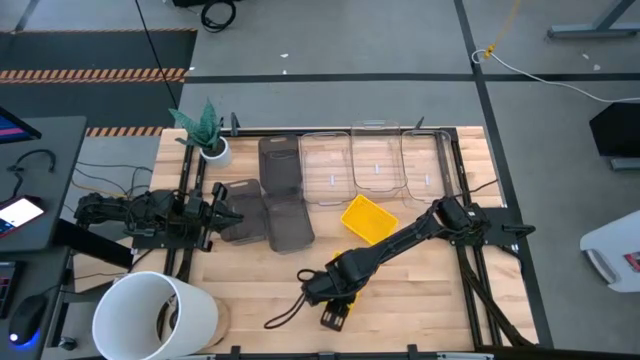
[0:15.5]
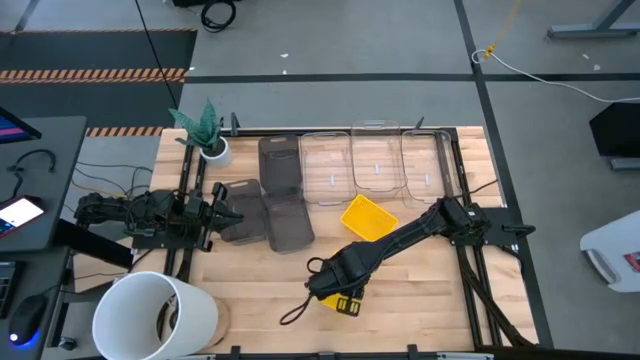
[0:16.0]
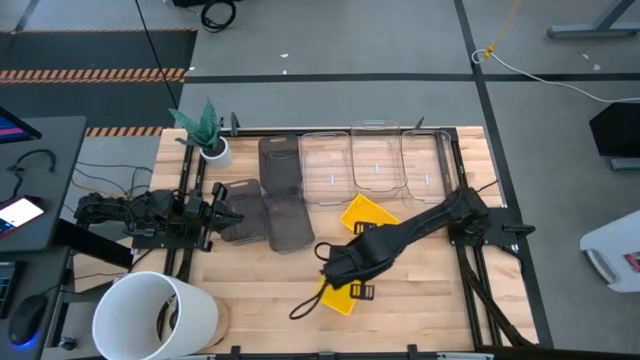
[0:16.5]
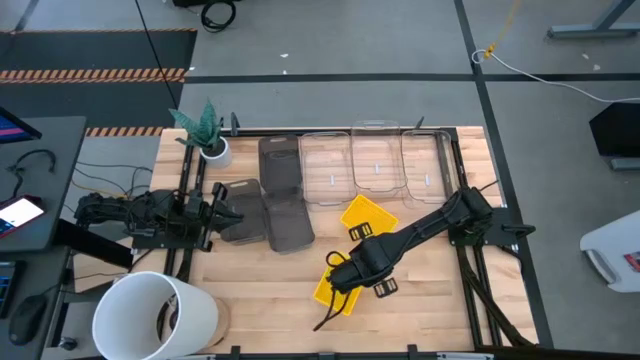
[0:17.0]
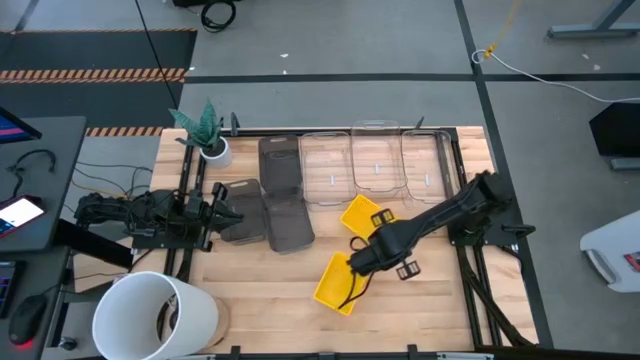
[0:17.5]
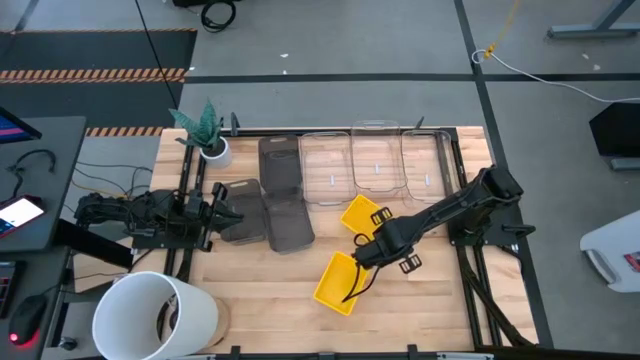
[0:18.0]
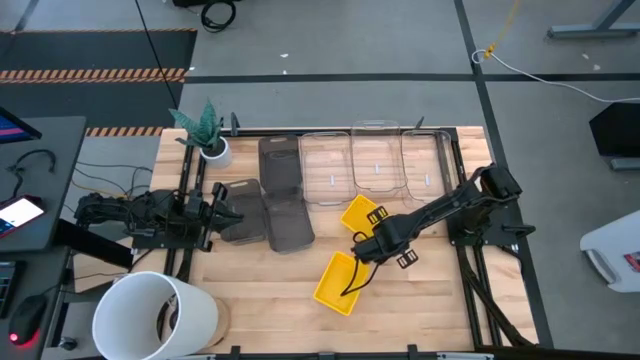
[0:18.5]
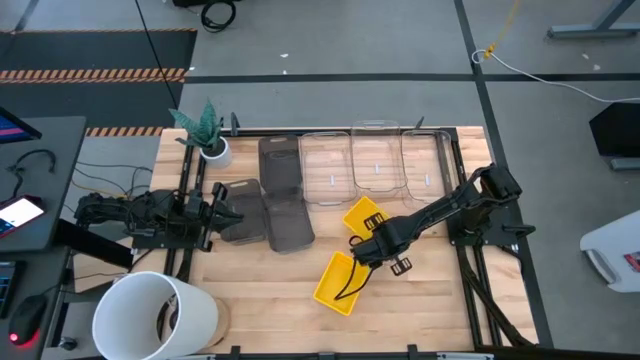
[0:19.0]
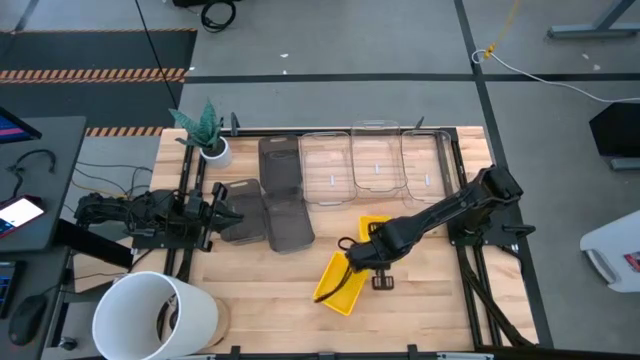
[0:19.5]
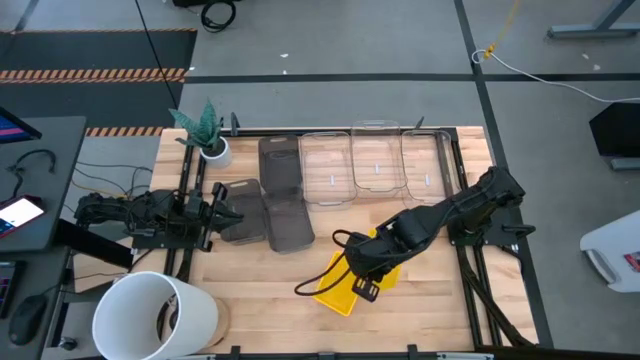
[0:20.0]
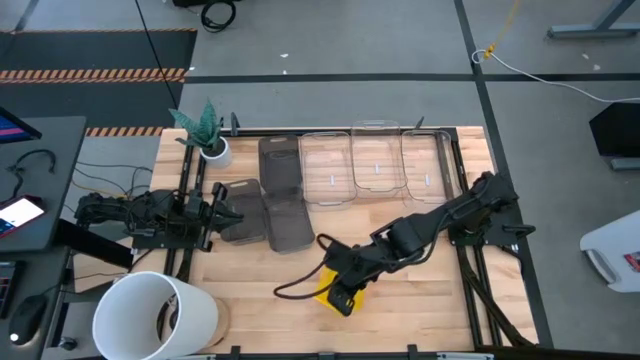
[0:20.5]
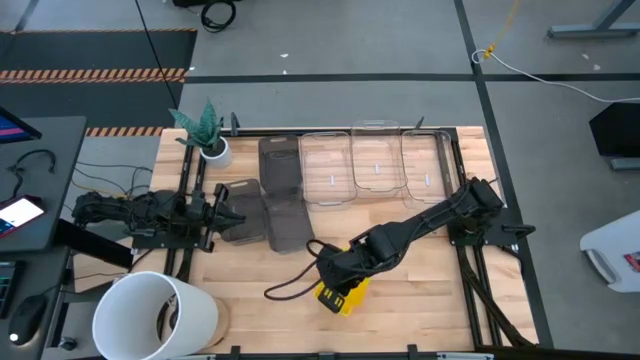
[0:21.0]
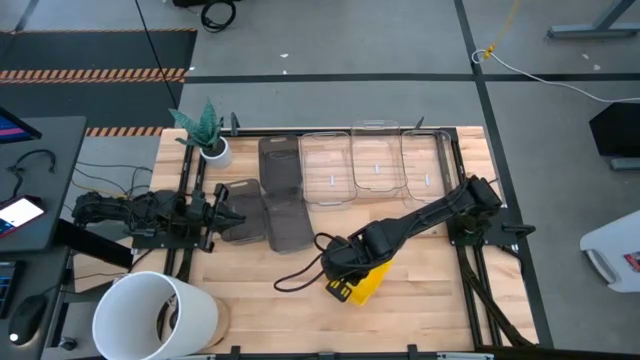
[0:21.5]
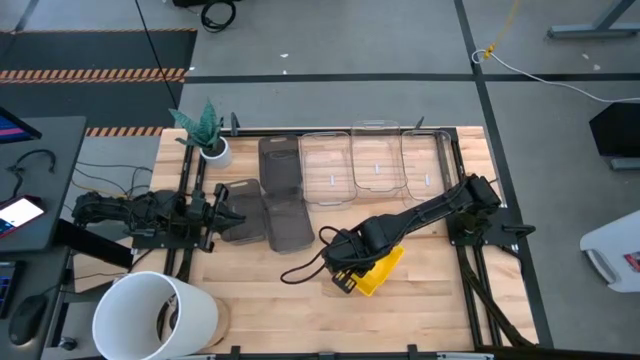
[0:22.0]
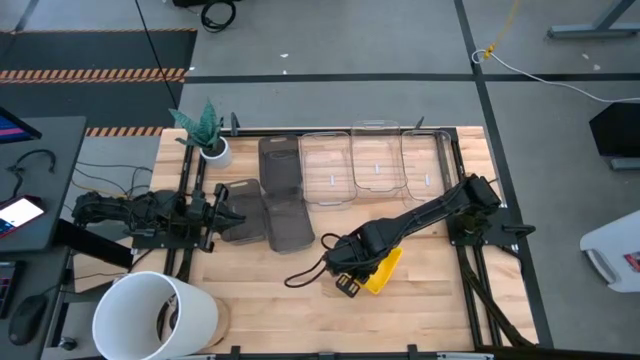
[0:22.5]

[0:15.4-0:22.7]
Stack the yellow bin on the stacked yellow bin

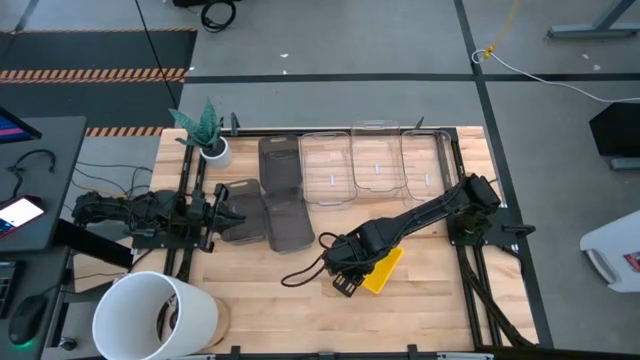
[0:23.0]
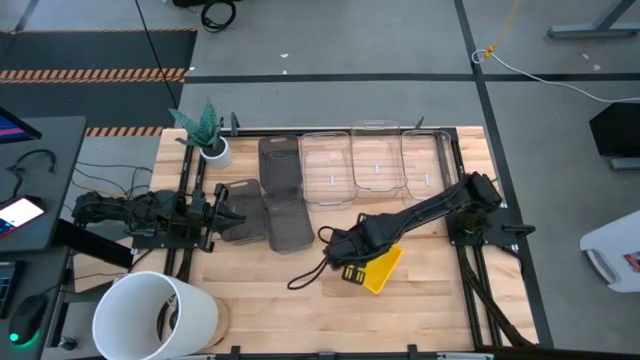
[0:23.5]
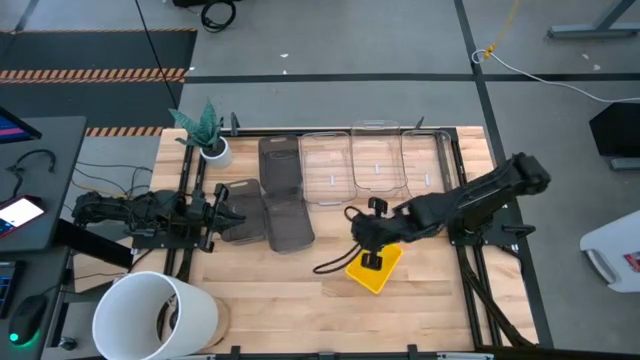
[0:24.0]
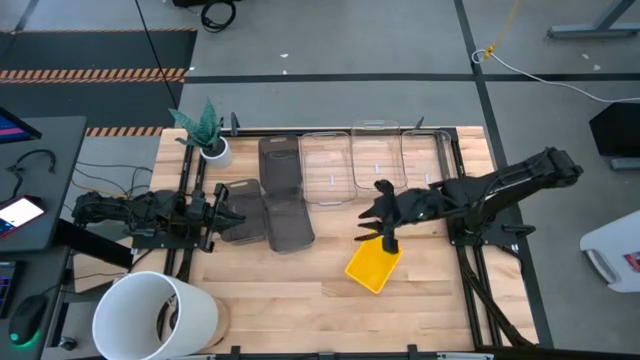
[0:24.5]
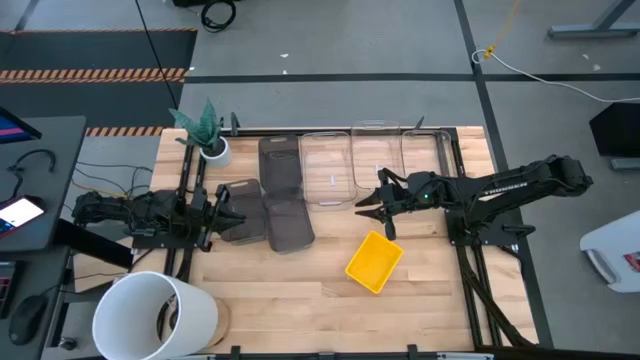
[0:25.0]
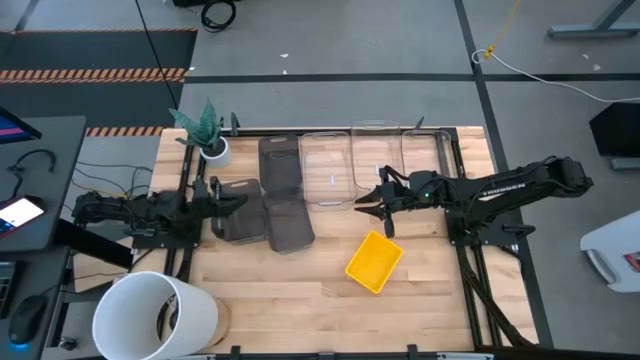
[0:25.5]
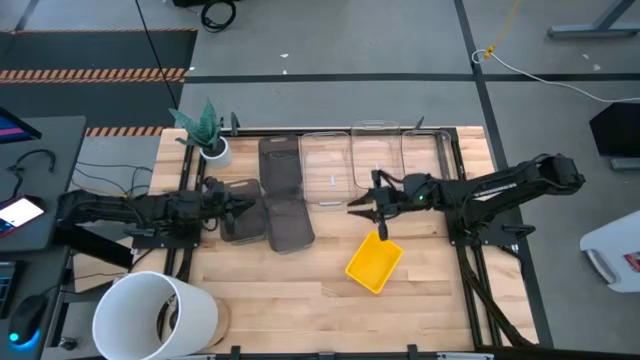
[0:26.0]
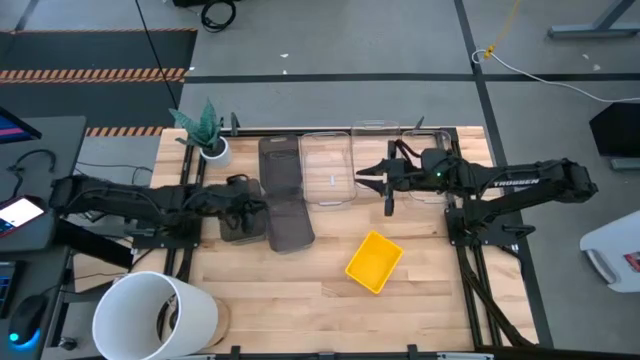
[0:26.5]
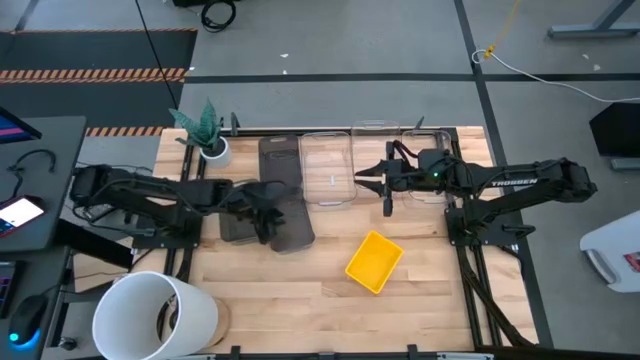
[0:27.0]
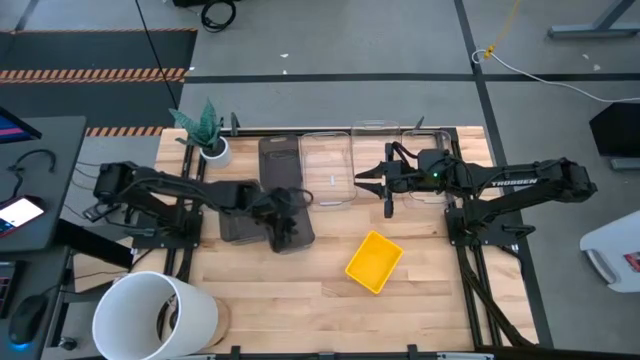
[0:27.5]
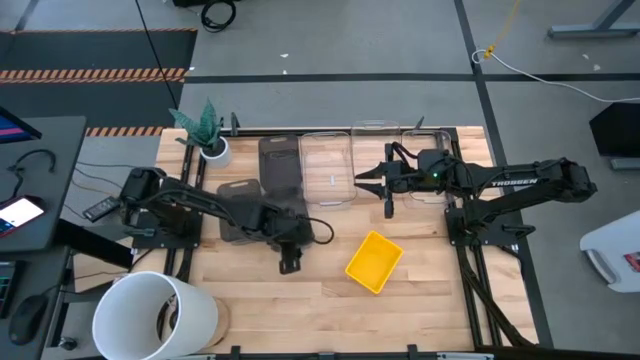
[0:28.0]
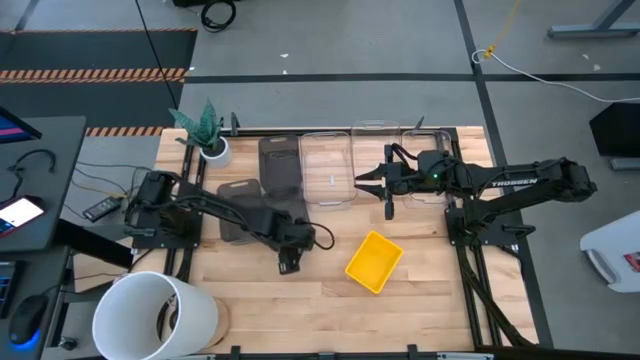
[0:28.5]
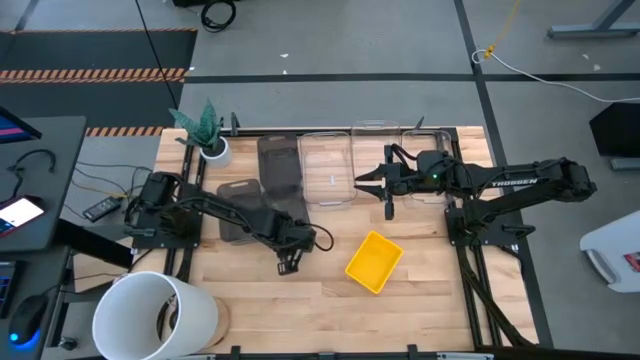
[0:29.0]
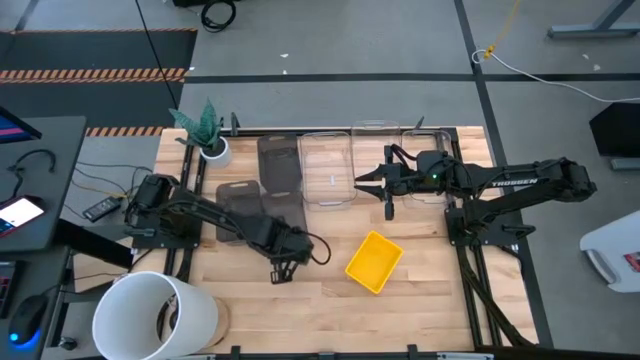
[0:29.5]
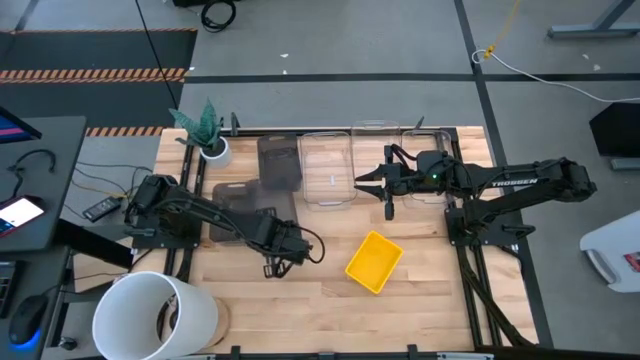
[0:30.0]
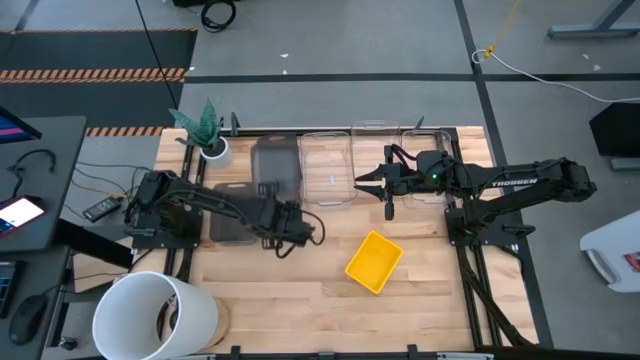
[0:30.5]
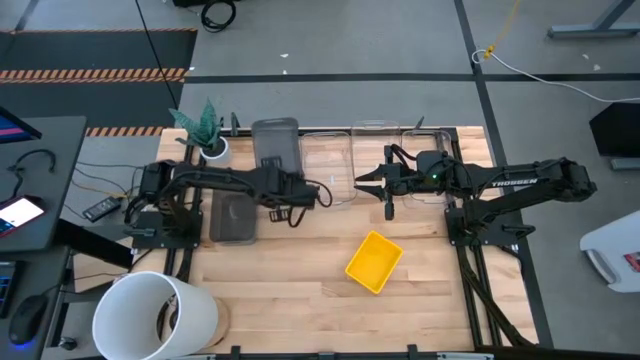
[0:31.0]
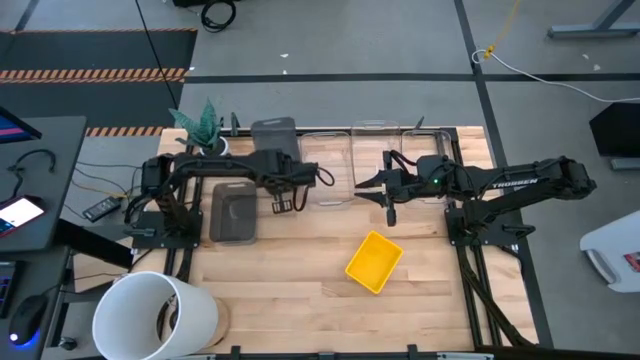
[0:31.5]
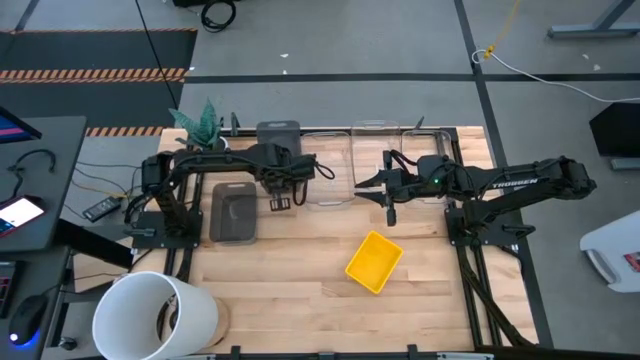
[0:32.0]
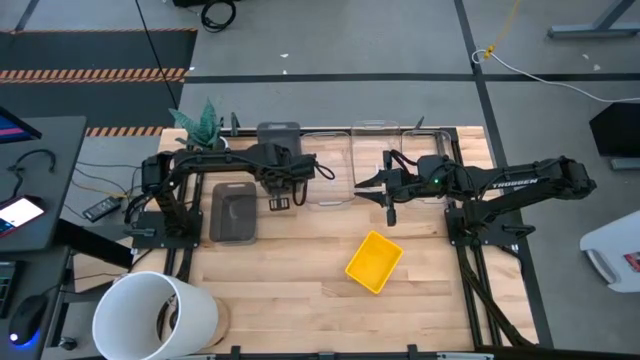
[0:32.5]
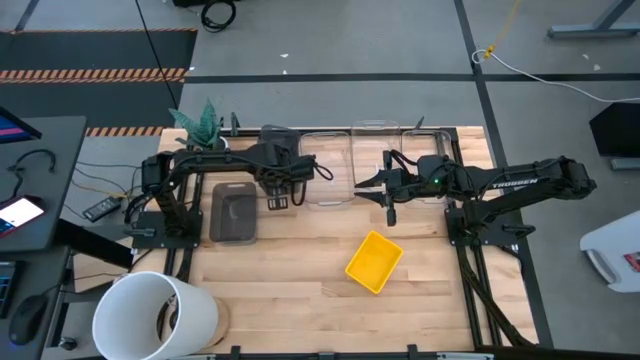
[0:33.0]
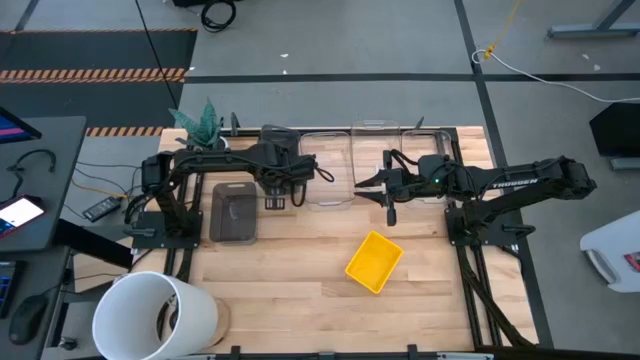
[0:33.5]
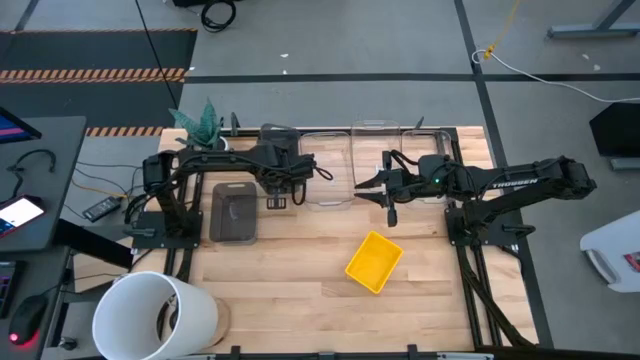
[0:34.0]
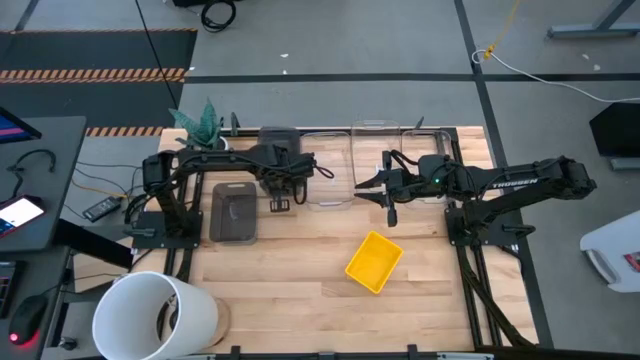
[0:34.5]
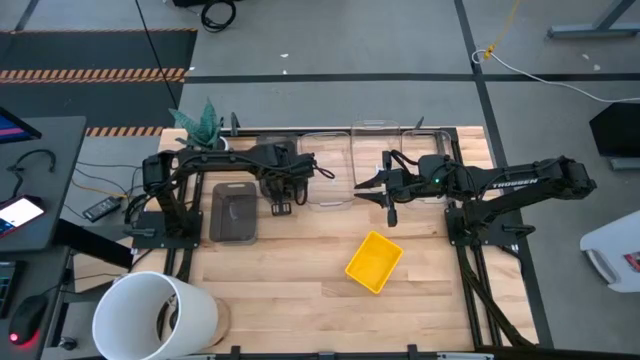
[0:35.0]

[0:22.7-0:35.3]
Stack the bottom right black bin on the top black bin
